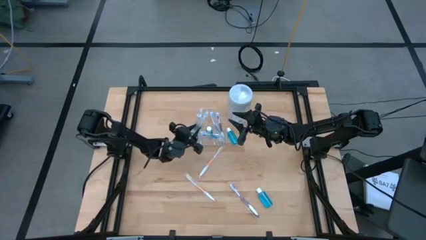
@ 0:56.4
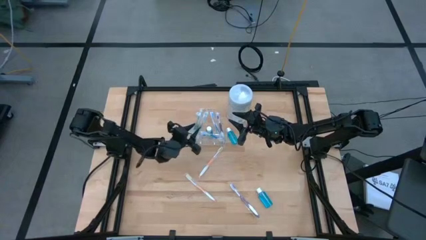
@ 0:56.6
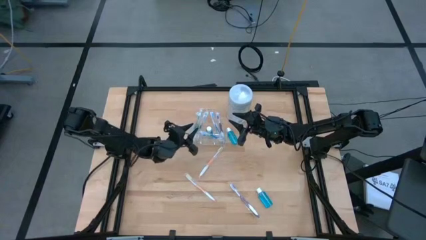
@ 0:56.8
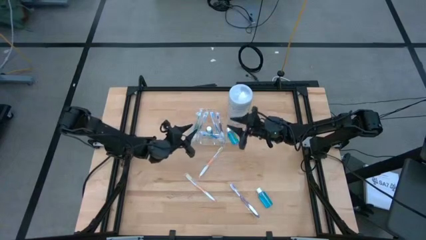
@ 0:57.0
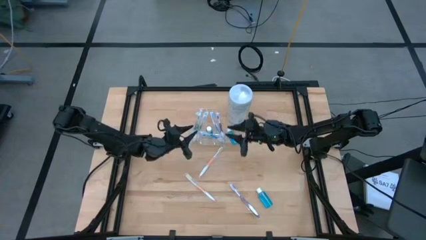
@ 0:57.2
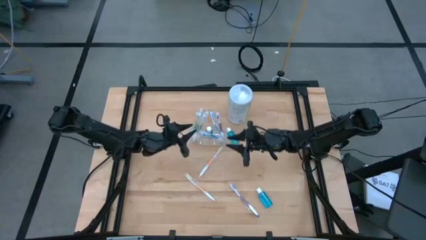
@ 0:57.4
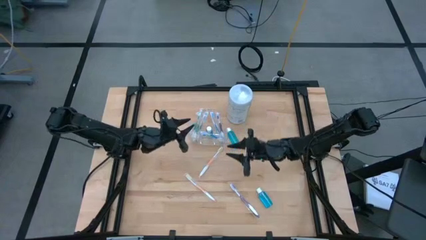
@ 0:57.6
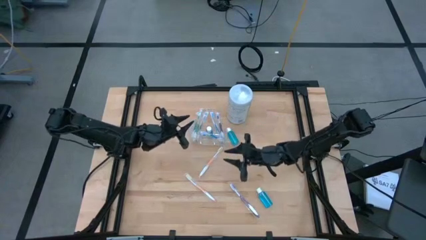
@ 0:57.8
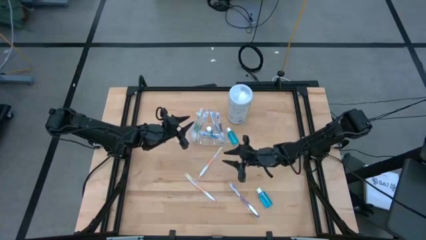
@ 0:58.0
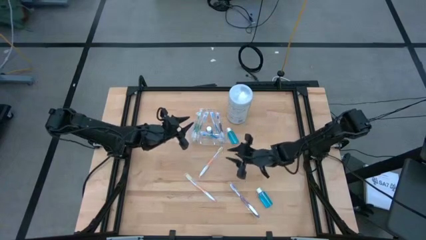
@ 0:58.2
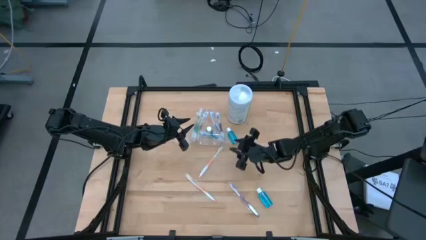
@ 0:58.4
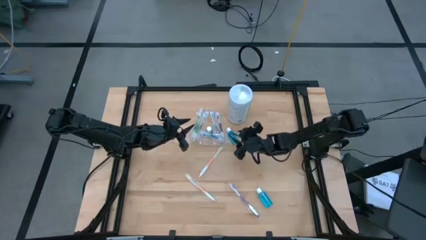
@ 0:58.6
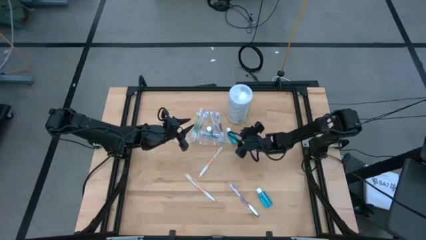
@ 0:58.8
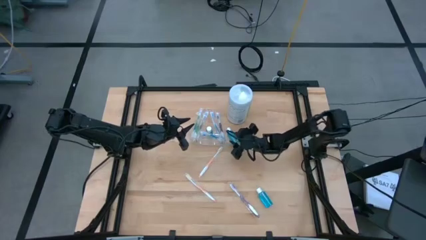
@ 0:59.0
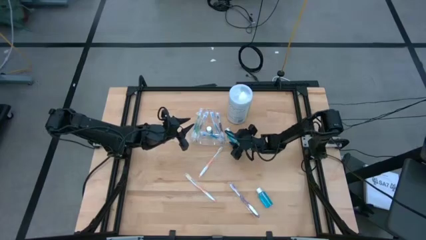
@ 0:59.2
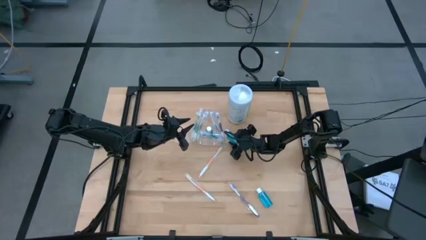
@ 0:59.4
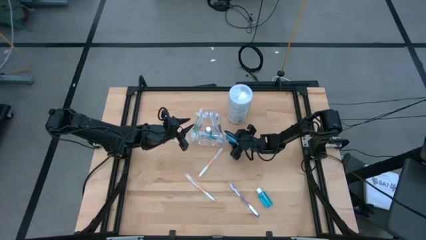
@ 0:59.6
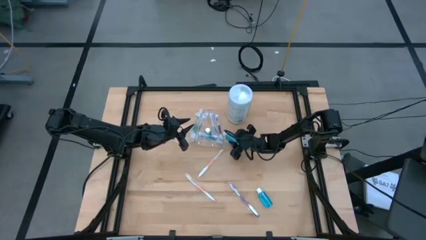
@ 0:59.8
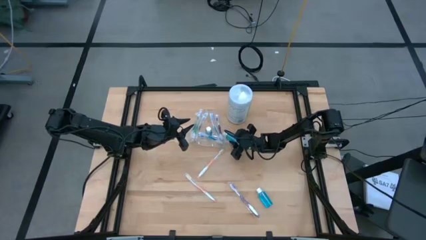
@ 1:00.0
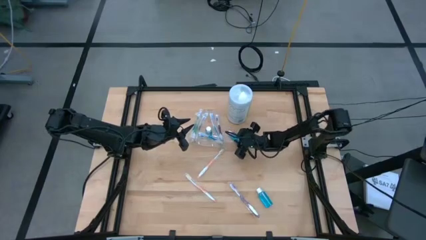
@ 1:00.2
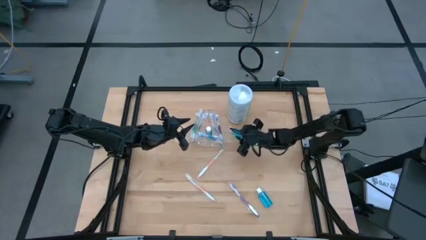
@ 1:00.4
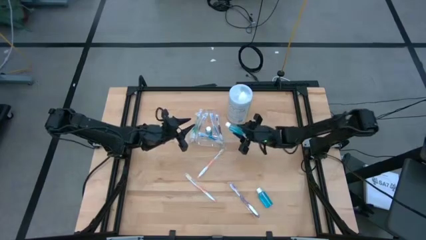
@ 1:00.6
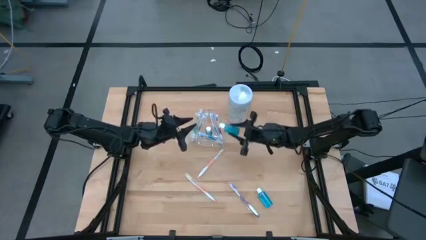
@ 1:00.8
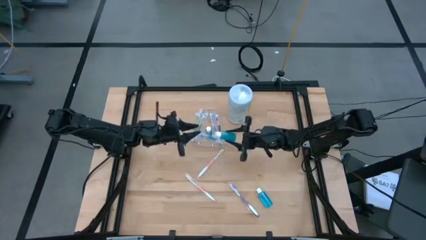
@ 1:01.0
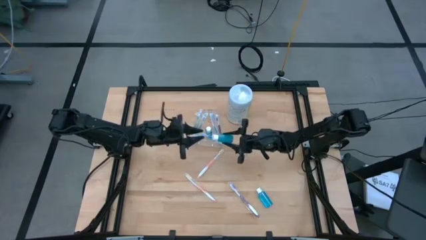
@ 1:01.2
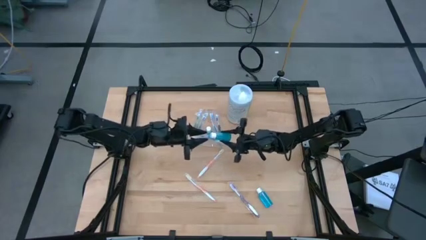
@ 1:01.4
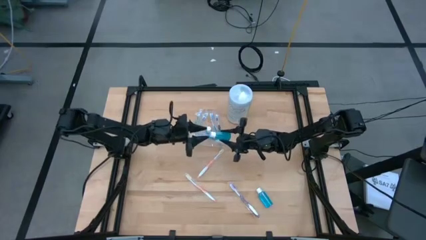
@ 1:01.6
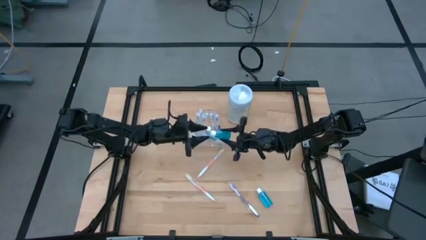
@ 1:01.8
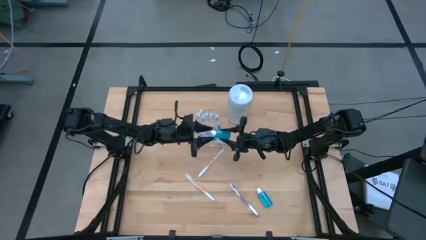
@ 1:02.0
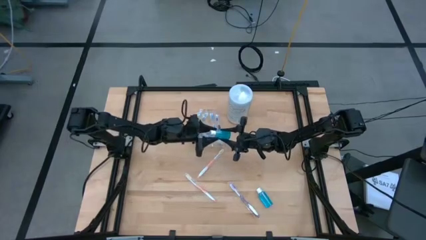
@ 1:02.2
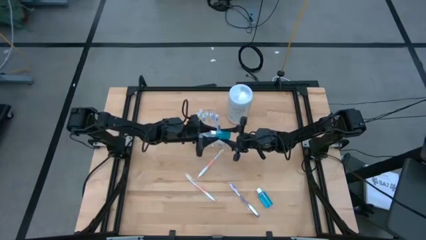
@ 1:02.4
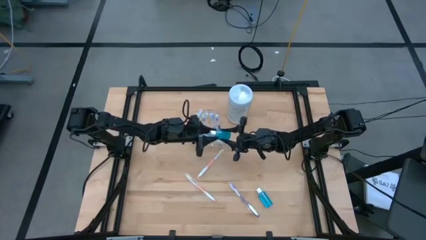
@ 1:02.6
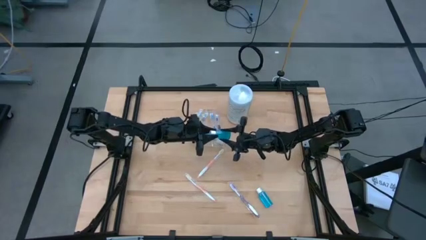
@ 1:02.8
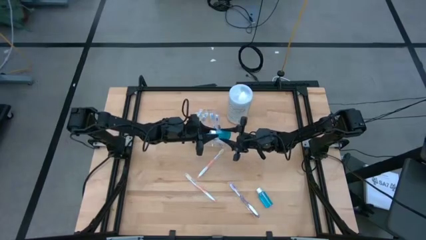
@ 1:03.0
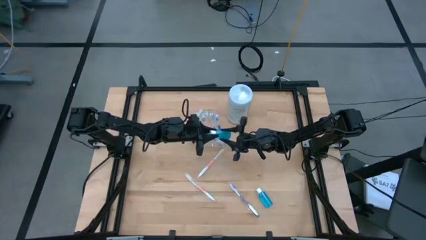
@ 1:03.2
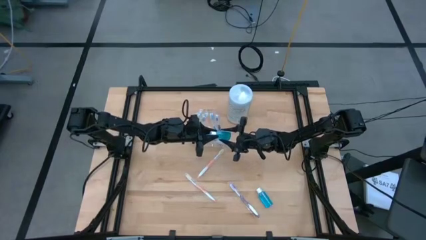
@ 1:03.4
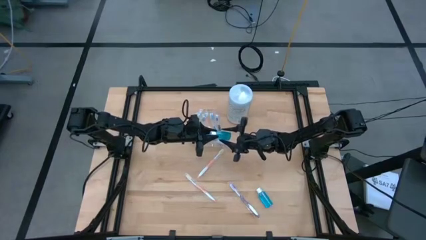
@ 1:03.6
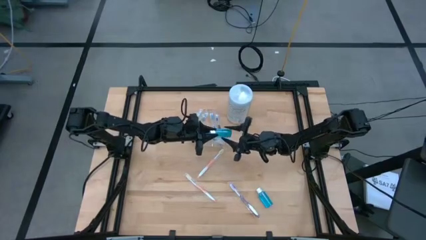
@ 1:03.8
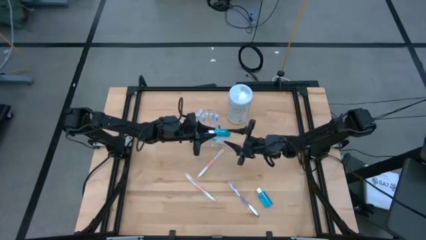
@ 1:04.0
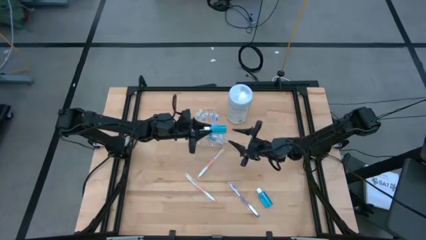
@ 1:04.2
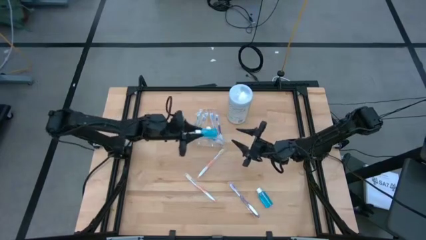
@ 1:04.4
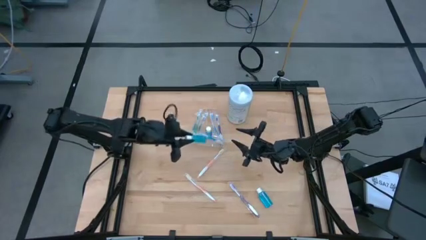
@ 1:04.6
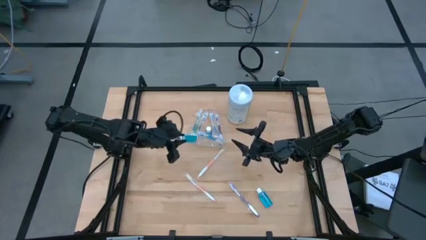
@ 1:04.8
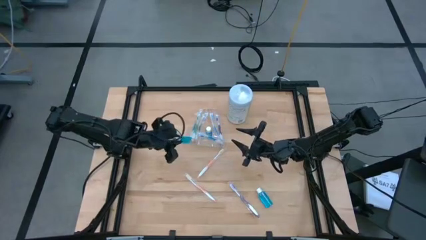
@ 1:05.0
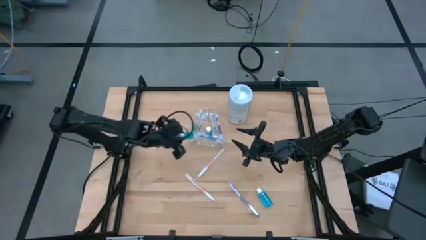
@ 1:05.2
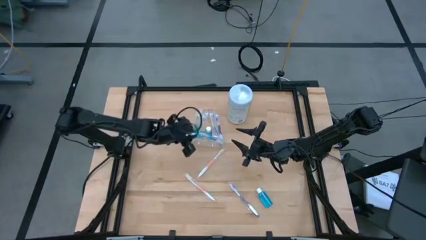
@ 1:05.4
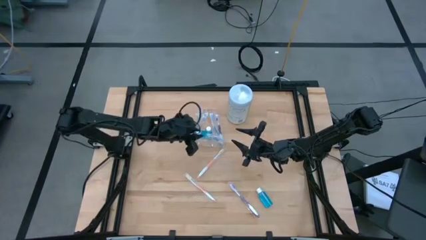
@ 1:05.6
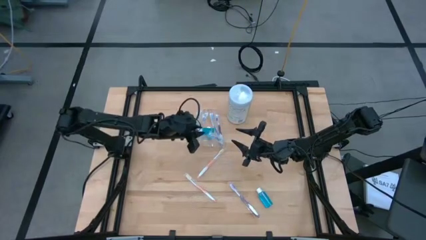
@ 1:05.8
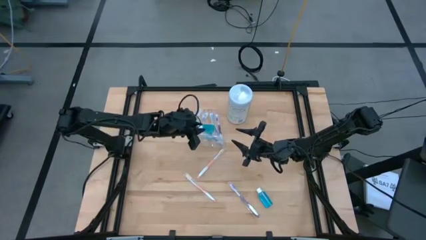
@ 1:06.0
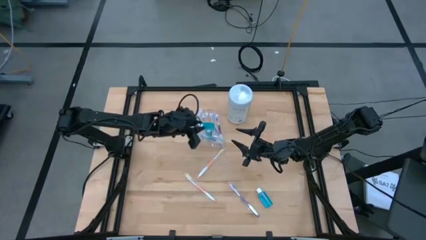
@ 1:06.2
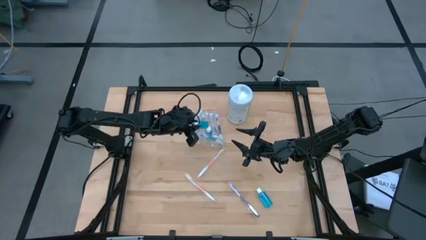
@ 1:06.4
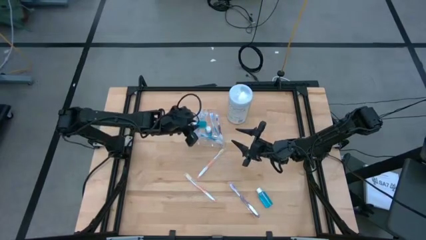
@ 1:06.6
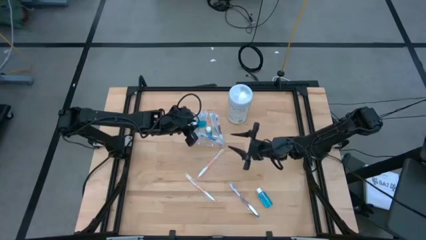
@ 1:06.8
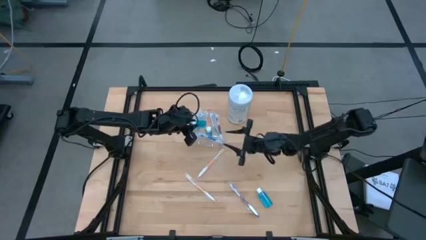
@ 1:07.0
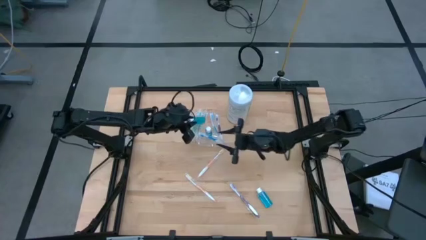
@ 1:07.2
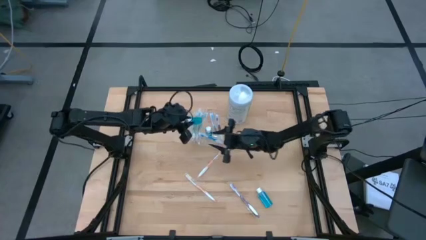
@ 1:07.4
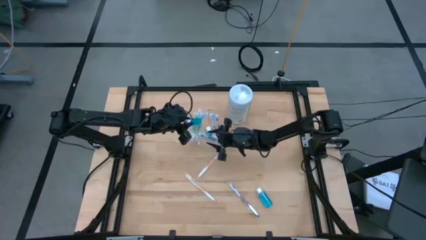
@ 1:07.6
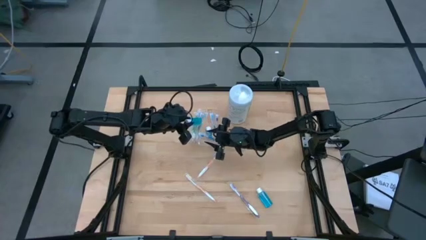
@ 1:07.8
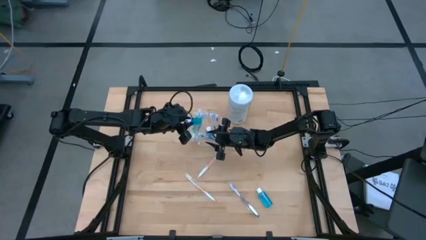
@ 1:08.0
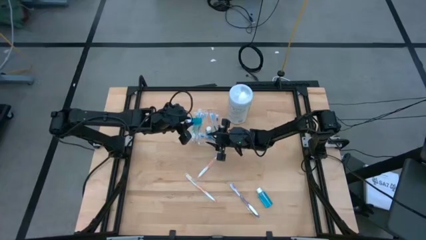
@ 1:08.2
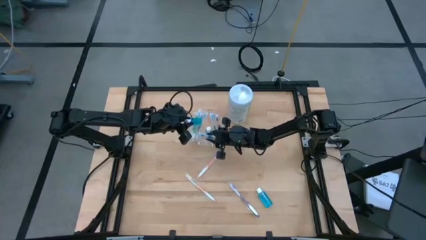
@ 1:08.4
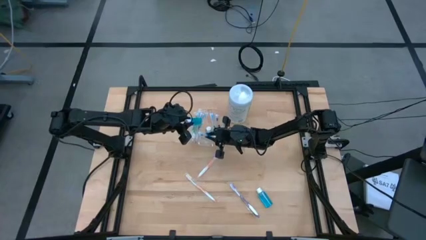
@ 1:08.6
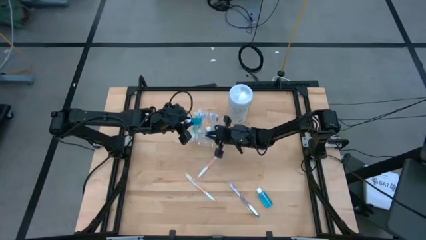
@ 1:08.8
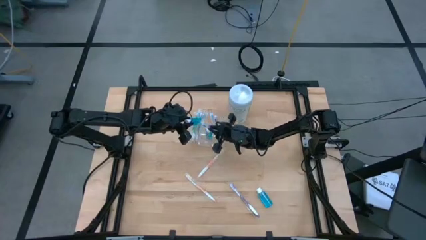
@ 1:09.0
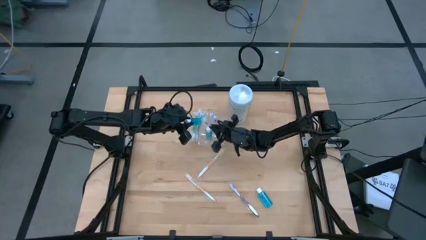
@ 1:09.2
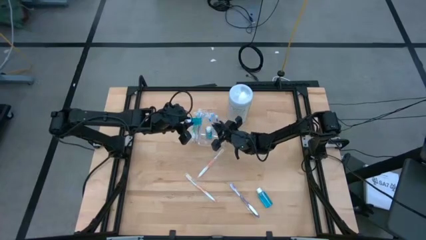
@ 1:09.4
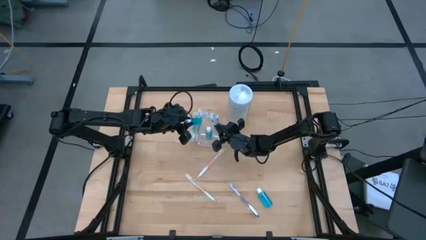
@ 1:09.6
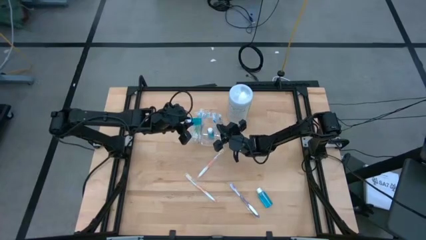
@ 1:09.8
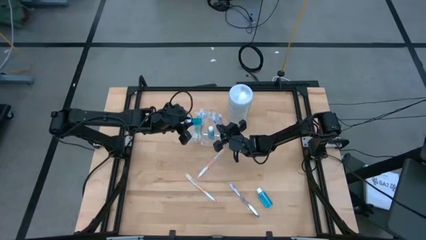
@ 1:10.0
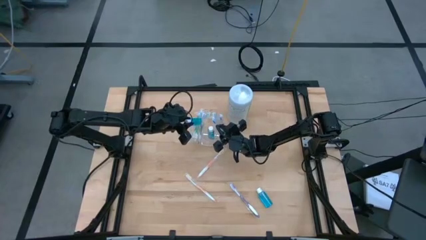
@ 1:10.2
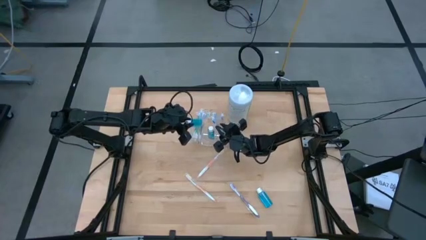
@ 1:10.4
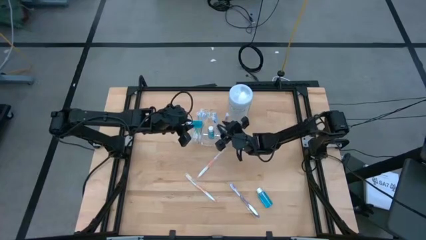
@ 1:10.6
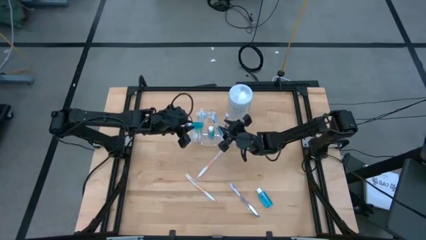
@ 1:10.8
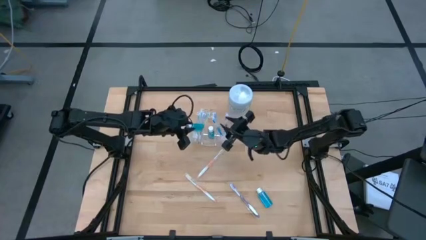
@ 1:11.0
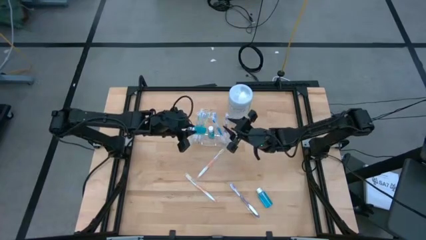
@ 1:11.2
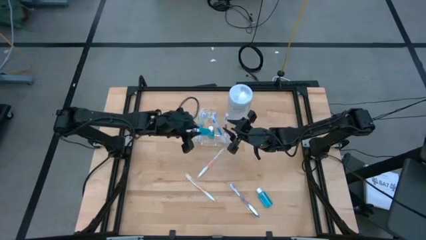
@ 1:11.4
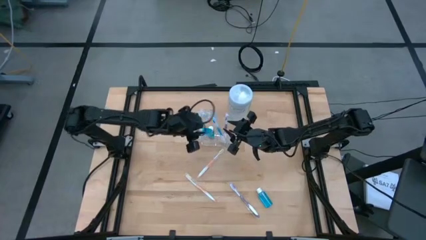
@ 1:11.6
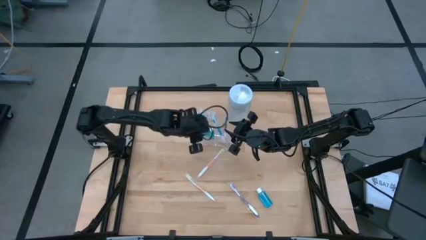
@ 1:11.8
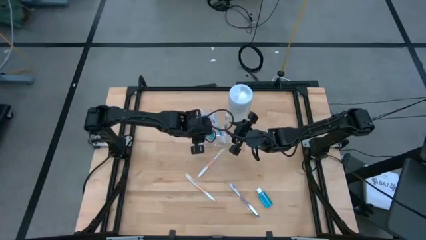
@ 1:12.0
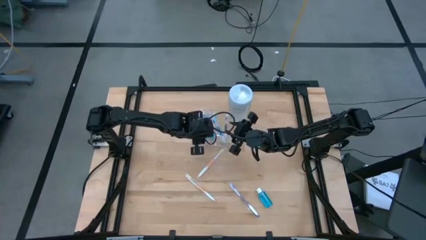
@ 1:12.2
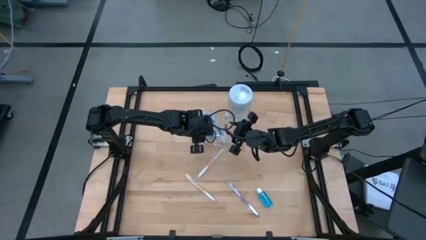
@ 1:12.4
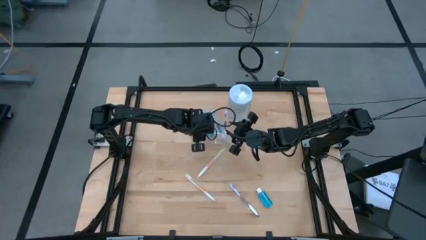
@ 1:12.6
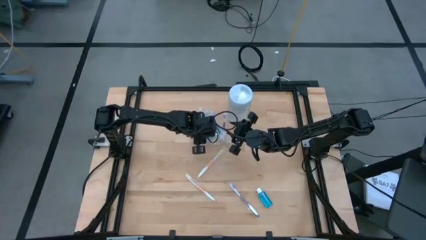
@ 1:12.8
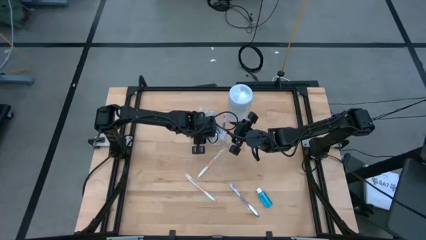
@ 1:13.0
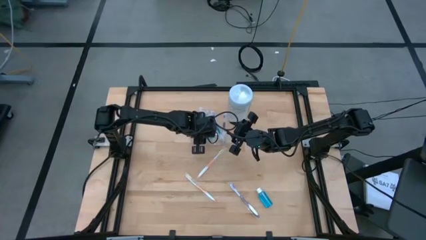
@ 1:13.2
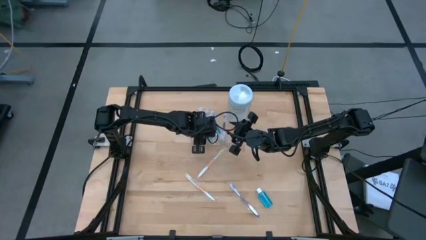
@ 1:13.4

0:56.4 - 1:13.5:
Task: Pick & Place toothbrushing station
Put the top mouthwash into the transparent organizer
